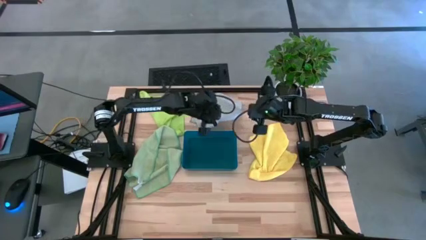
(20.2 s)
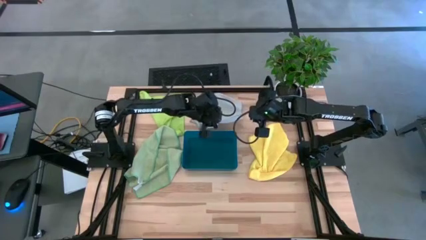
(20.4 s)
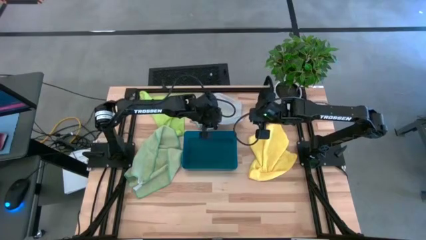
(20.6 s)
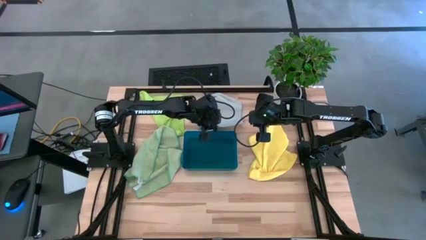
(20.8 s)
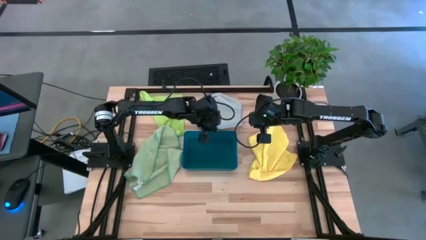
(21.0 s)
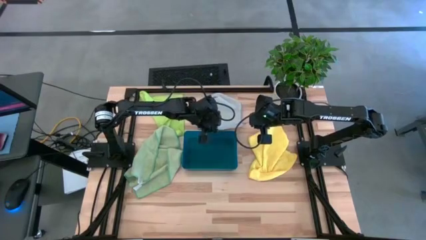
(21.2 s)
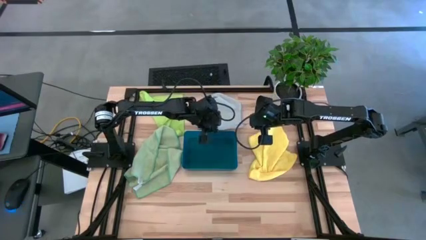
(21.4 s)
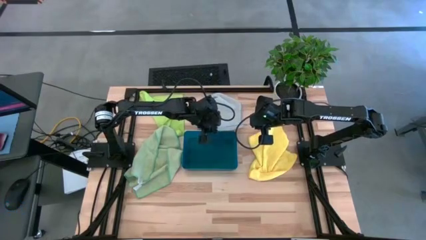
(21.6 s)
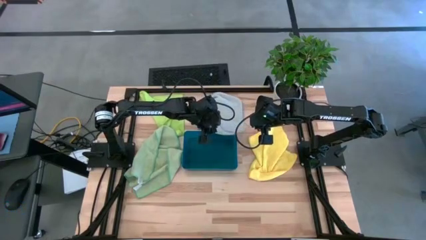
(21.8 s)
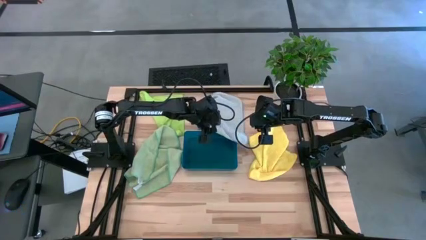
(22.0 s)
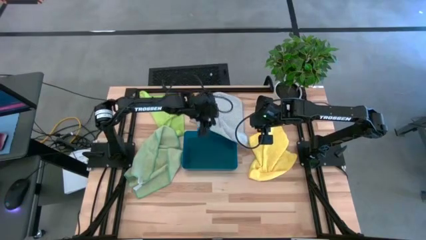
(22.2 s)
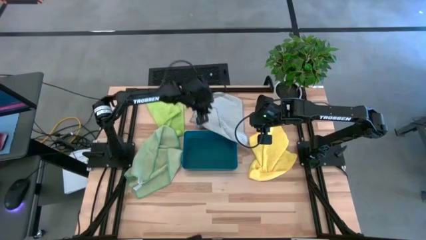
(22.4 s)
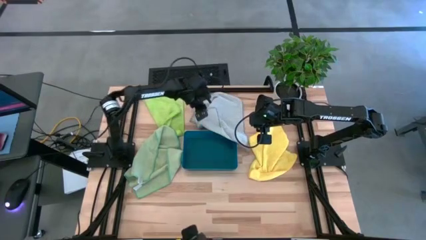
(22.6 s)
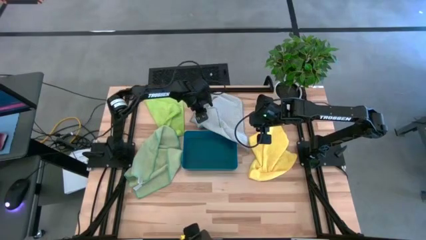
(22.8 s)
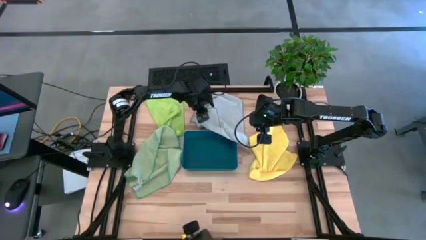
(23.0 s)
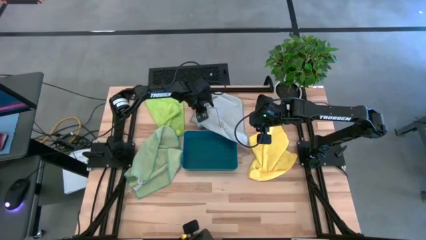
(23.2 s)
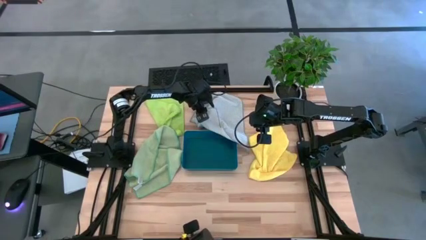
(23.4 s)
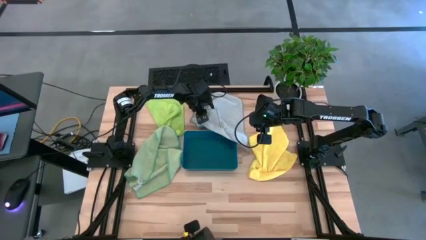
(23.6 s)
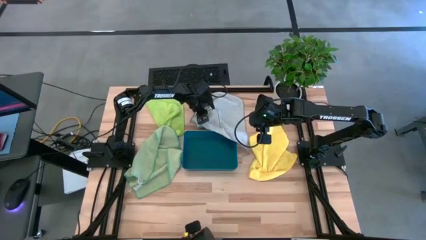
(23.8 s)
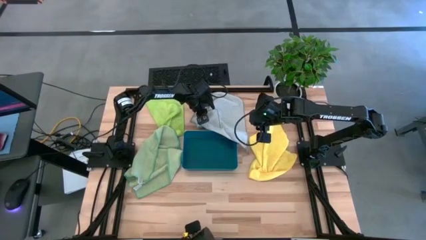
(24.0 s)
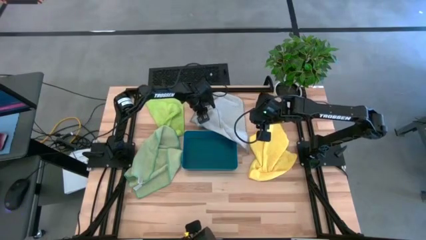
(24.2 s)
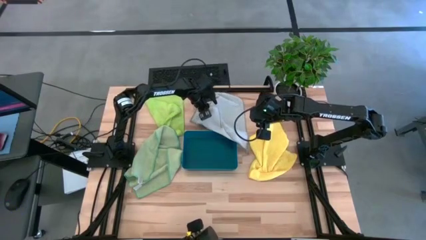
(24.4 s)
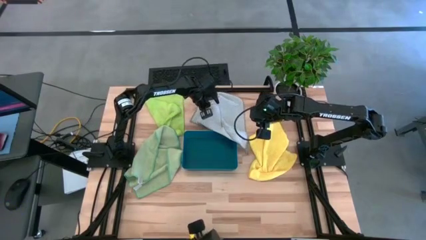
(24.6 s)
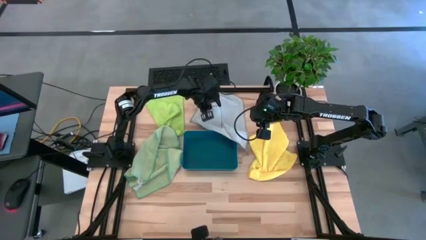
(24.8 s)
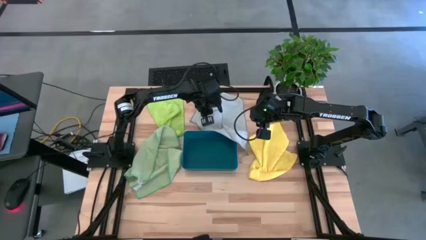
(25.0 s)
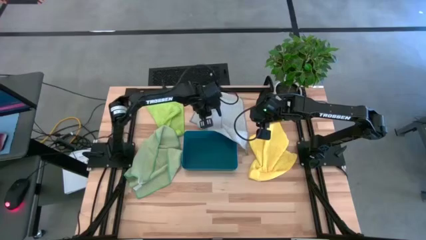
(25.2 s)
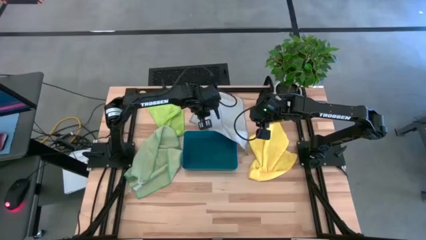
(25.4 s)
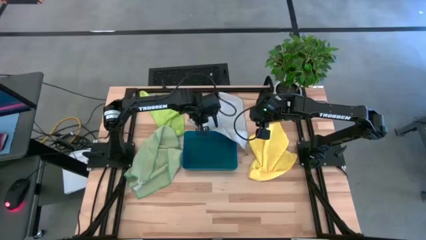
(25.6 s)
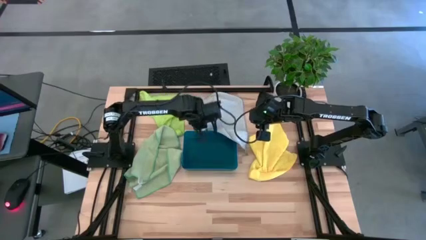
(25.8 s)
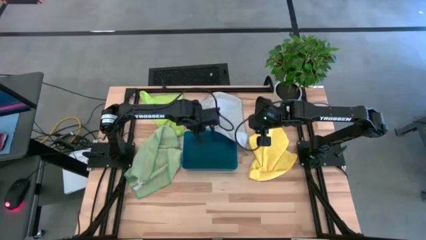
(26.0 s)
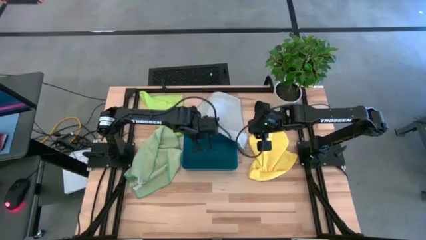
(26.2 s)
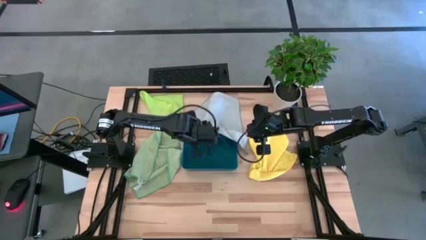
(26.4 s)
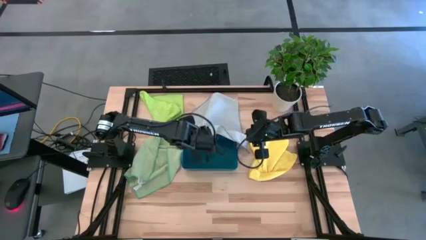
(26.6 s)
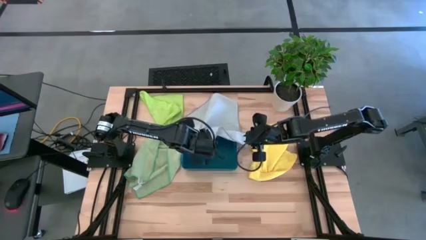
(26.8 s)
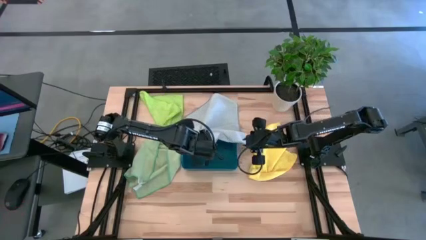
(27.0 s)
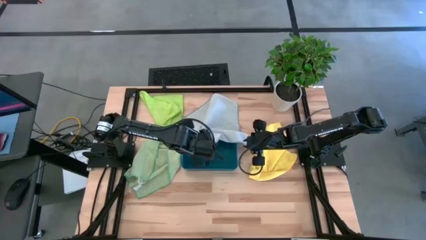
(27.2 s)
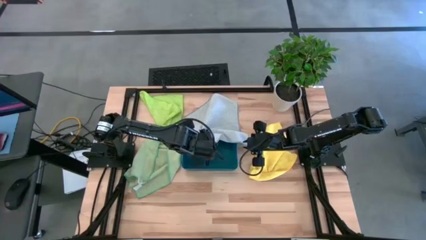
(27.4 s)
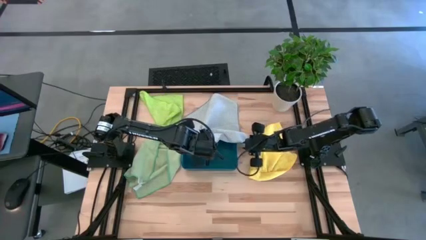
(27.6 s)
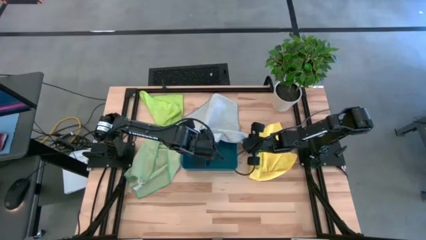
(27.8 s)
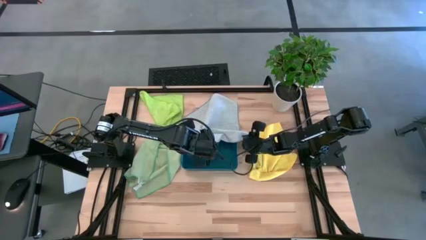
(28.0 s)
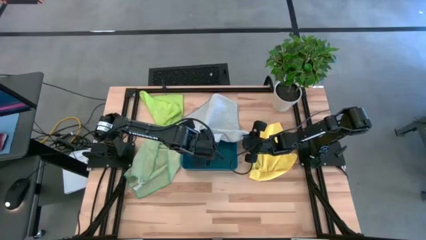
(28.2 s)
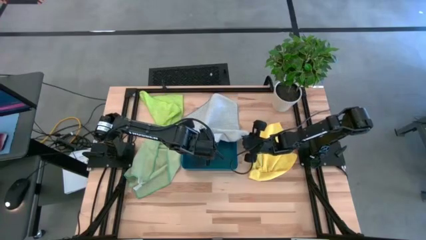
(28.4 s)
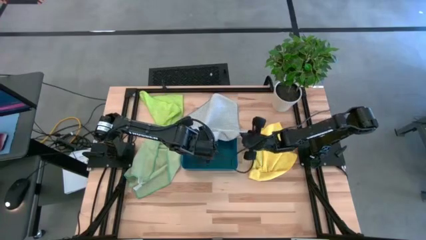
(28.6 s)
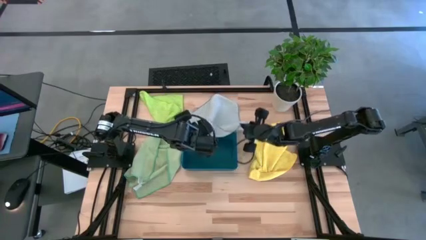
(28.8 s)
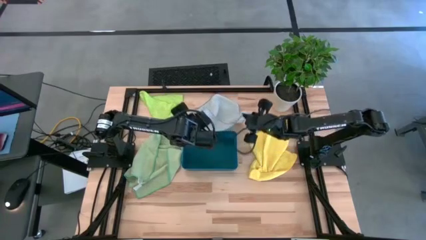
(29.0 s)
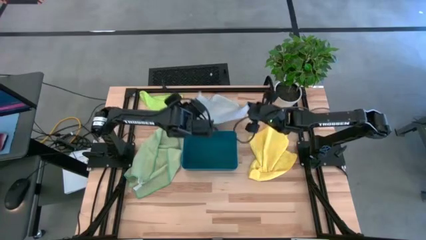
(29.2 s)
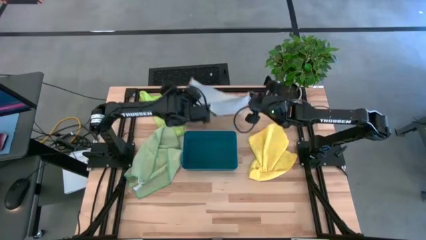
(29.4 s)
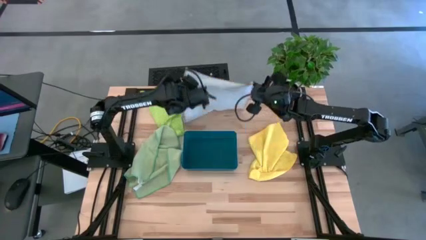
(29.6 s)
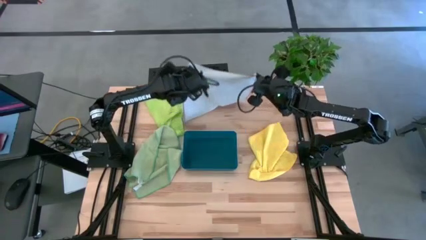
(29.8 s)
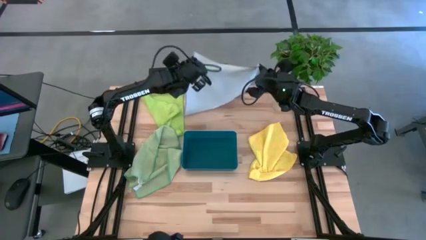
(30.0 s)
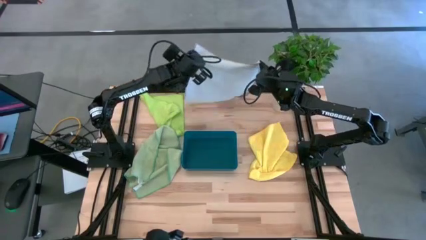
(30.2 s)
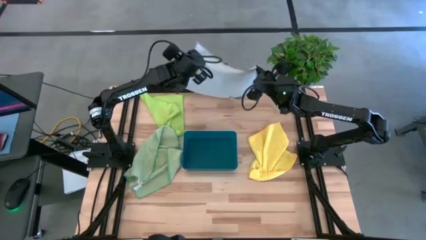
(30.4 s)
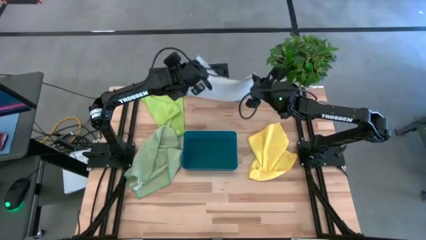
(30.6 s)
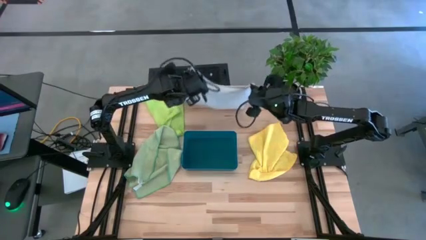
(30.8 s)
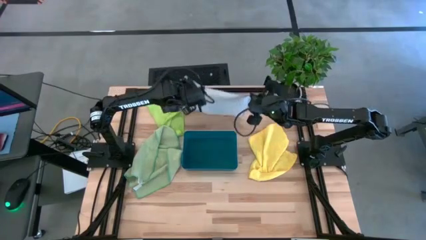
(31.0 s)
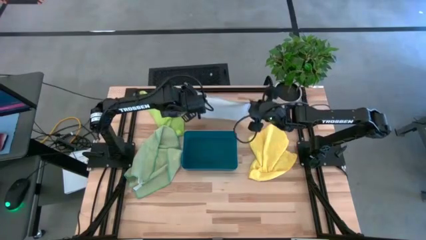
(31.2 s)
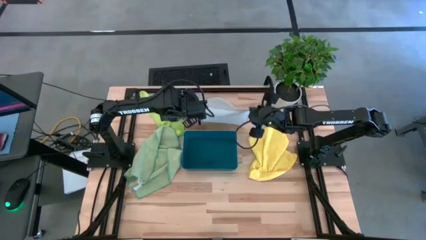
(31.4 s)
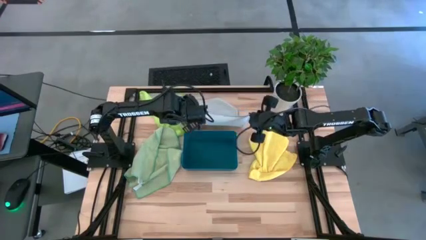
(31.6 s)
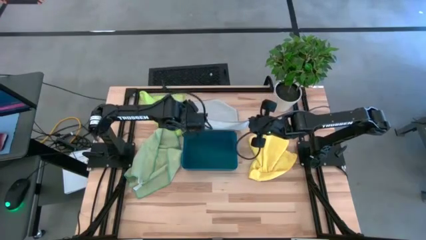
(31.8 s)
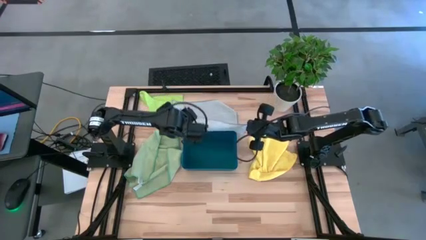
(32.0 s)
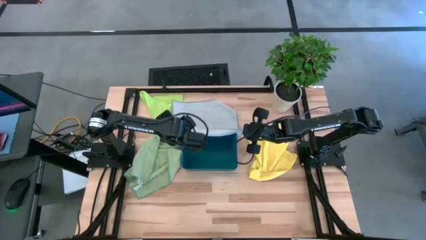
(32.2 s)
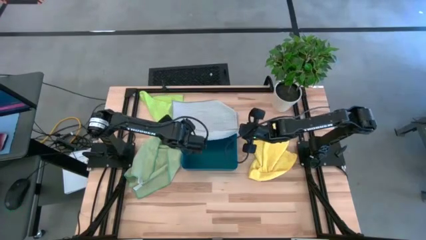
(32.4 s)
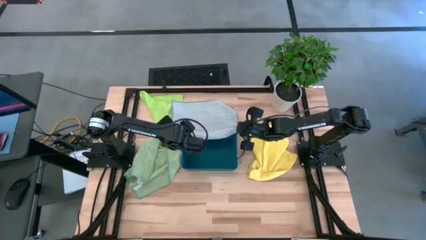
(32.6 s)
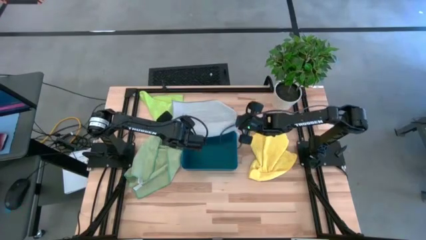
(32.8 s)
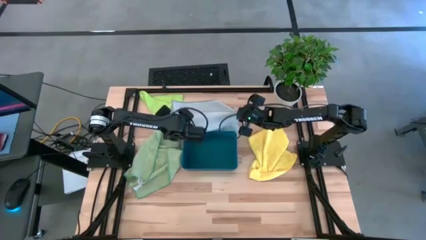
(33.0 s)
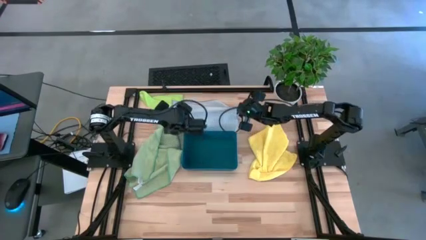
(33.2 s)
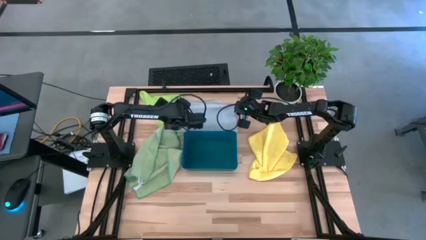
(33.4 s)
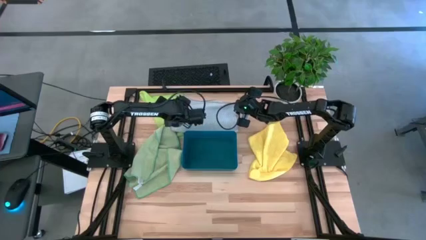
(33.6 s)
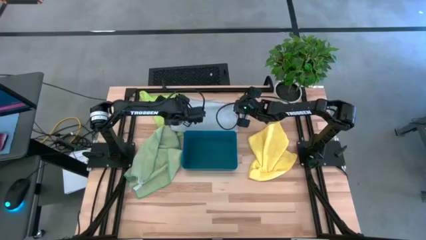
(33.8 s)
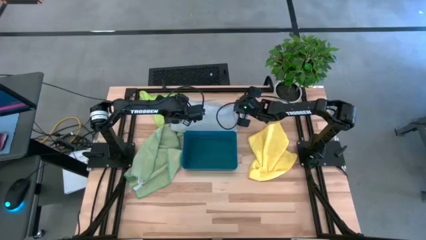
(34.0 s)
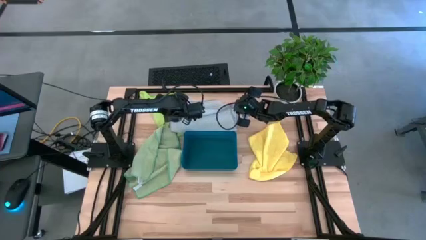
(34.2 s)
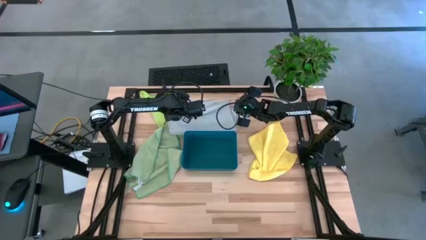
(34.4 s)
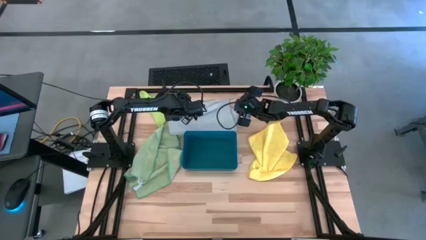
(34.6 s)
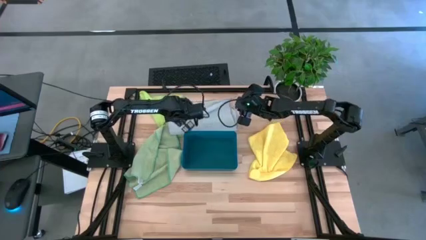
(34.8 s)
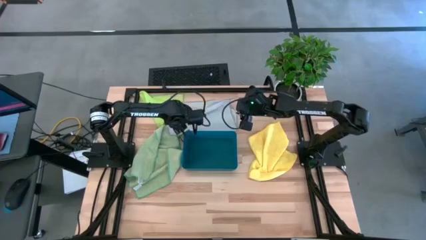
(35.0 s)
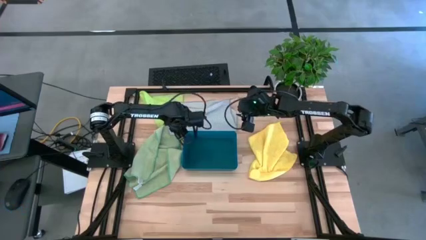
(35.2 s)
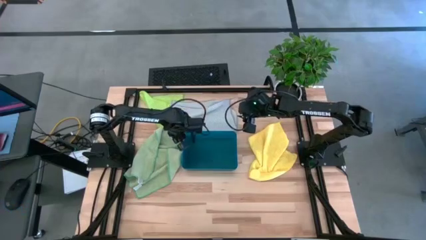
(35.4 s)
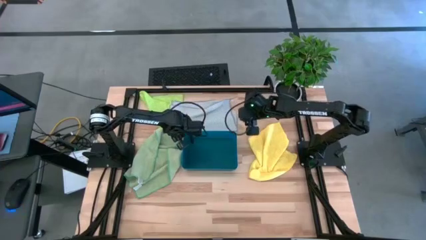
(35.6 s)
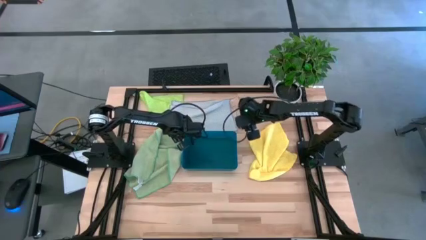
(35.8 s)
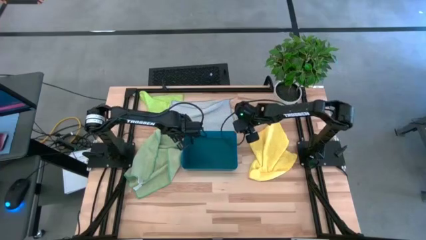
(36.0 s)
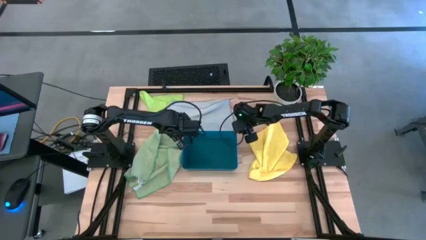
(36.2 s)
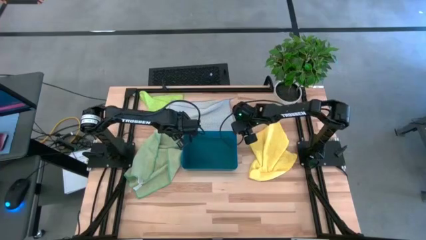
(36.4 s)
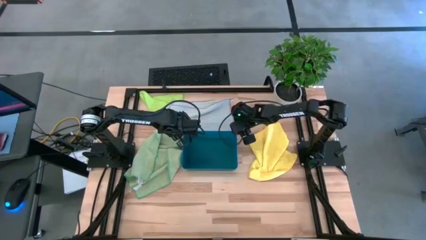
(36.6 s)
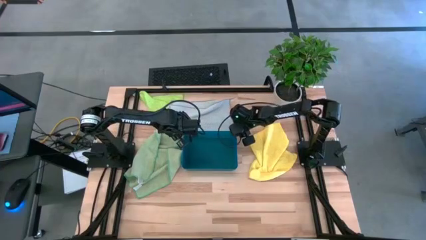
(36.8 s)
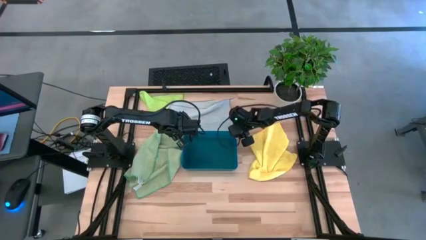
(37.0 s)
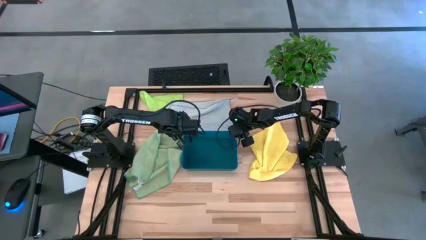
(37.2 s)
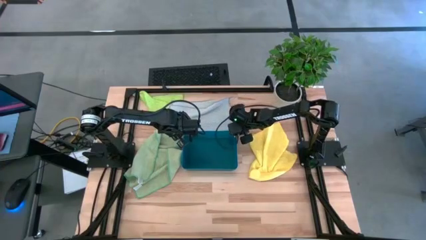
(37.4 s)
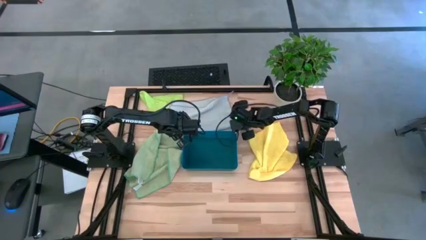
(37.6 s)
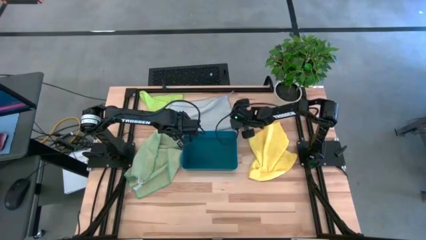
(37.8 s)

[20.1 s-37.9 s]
Task: Fold microfiber towels
Fold the gray microfiber towel
